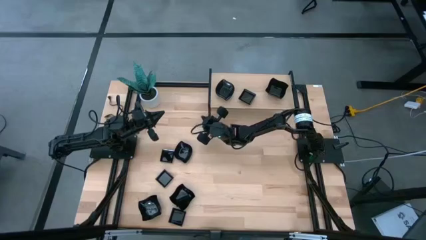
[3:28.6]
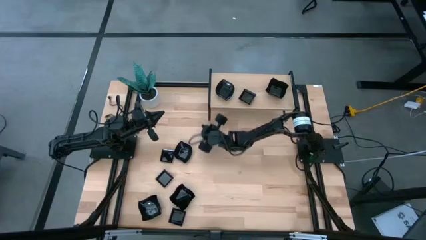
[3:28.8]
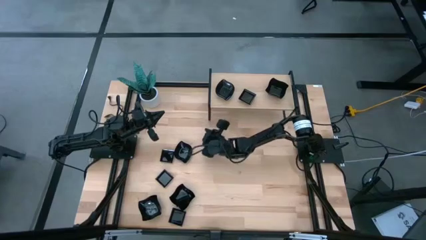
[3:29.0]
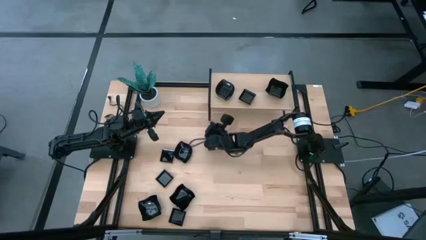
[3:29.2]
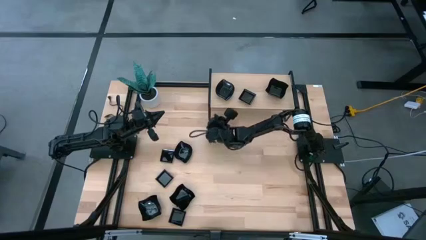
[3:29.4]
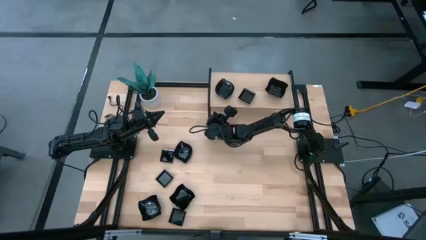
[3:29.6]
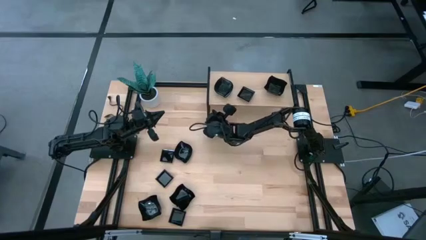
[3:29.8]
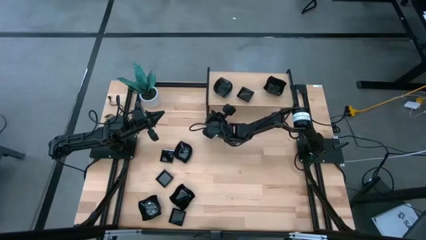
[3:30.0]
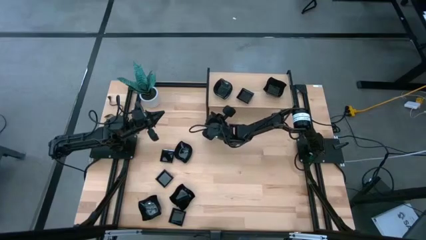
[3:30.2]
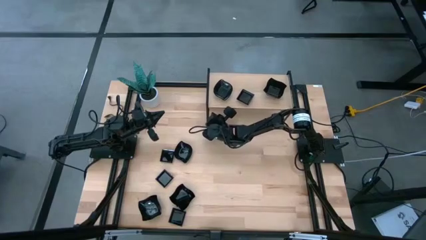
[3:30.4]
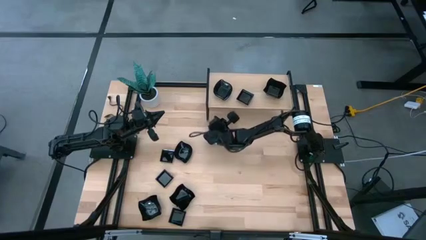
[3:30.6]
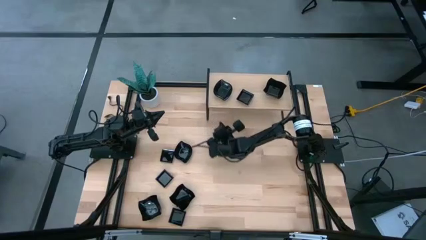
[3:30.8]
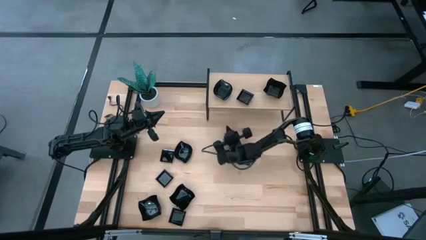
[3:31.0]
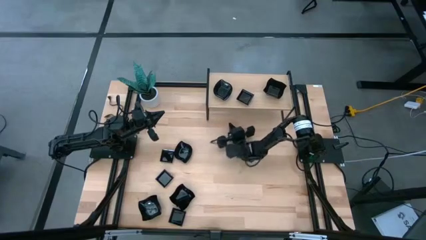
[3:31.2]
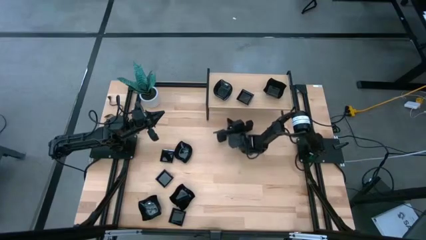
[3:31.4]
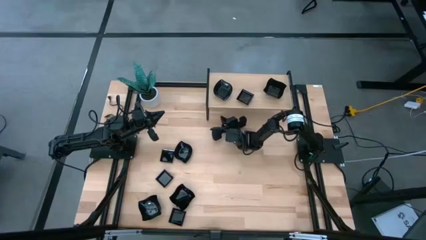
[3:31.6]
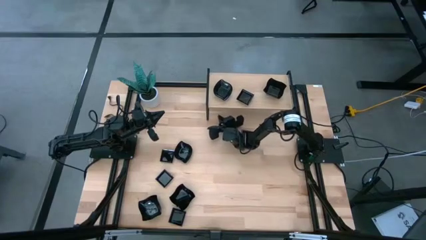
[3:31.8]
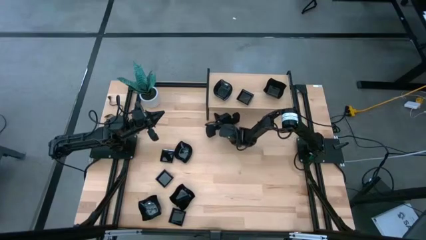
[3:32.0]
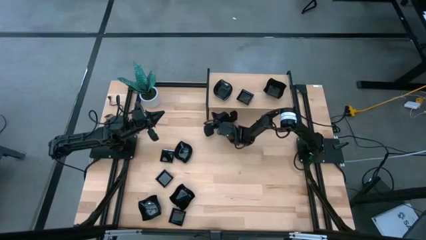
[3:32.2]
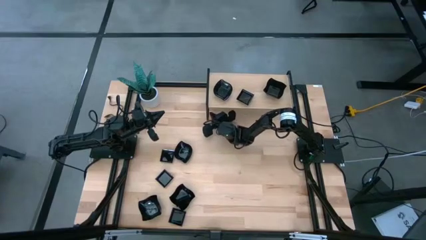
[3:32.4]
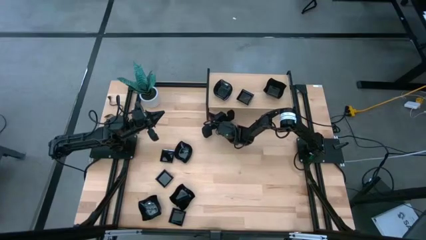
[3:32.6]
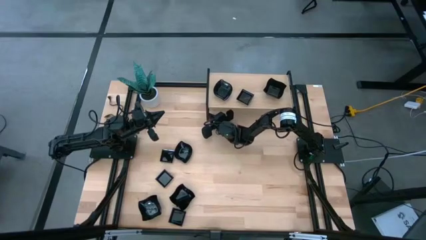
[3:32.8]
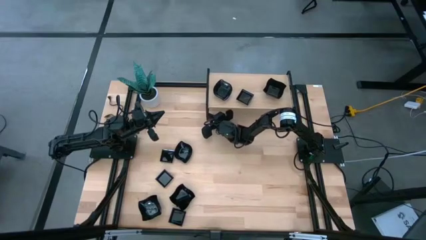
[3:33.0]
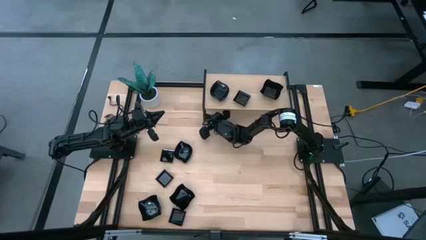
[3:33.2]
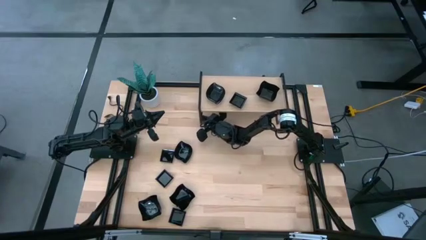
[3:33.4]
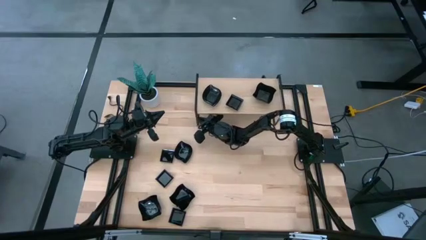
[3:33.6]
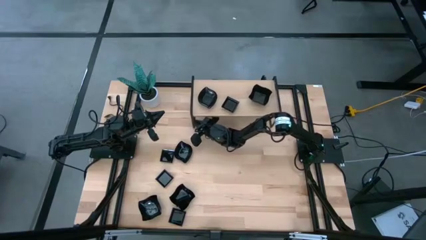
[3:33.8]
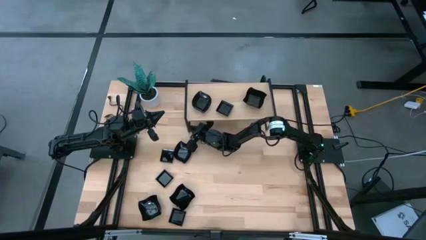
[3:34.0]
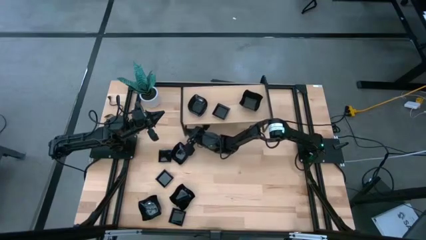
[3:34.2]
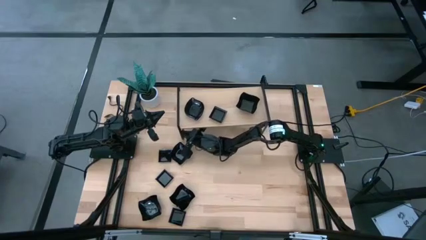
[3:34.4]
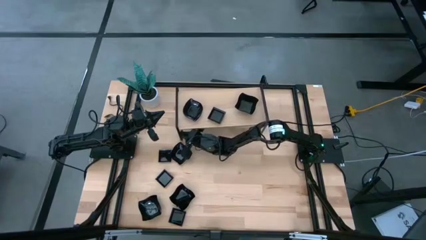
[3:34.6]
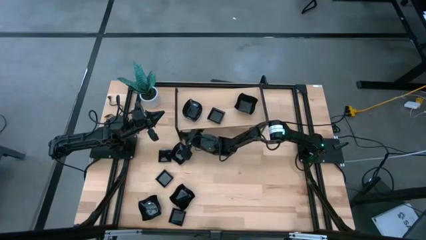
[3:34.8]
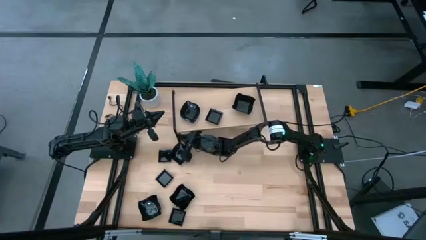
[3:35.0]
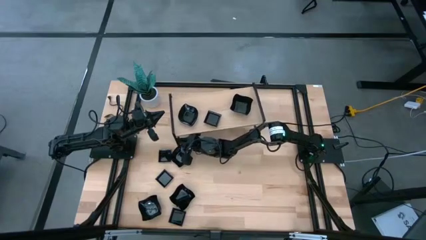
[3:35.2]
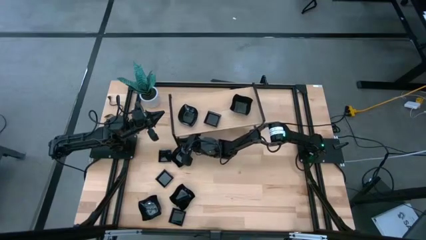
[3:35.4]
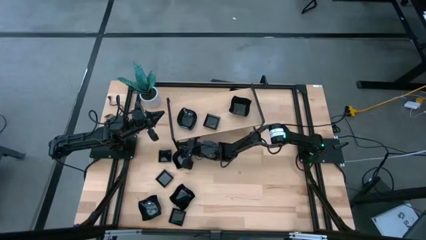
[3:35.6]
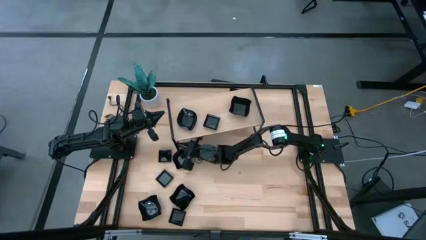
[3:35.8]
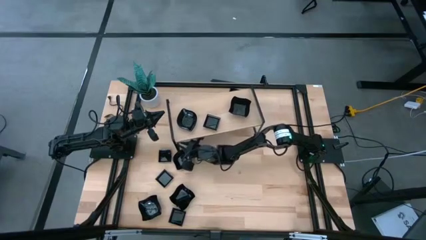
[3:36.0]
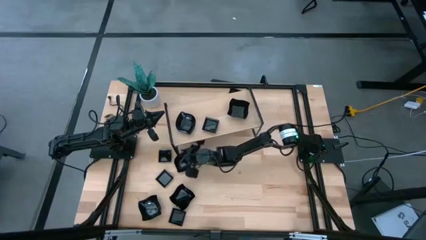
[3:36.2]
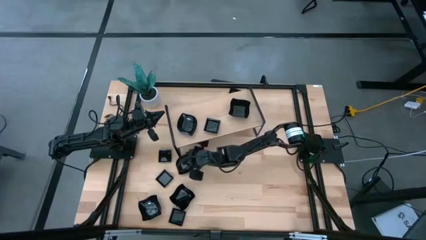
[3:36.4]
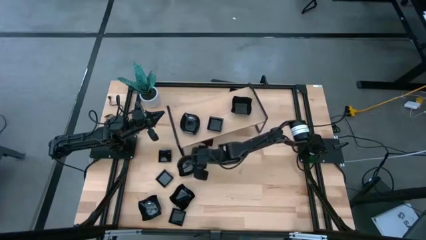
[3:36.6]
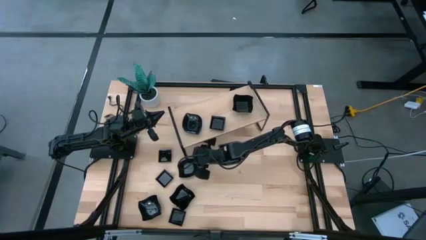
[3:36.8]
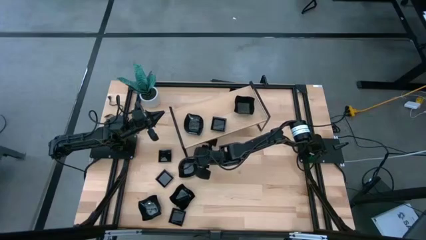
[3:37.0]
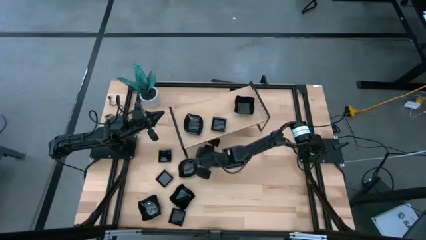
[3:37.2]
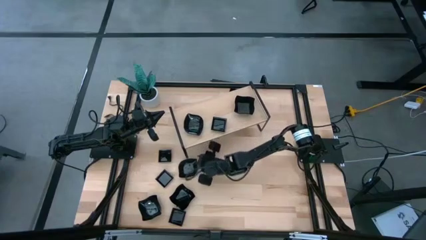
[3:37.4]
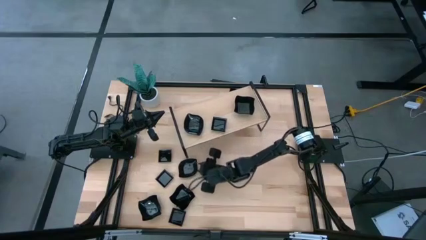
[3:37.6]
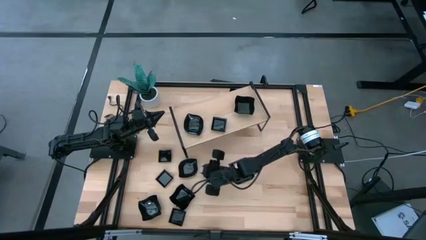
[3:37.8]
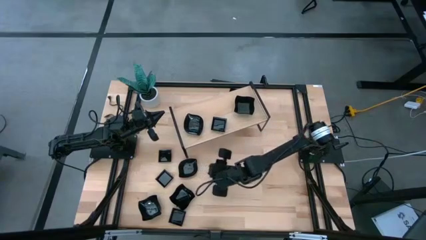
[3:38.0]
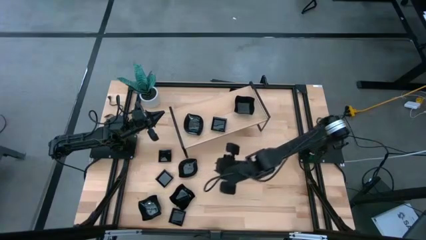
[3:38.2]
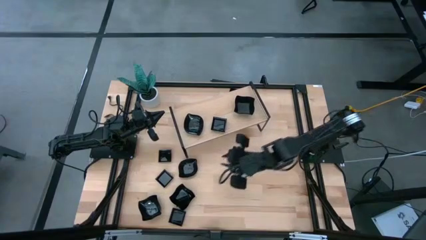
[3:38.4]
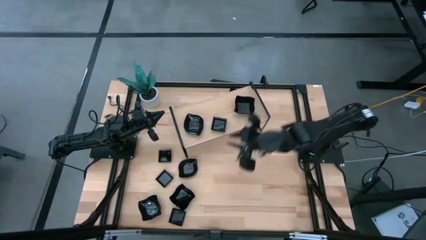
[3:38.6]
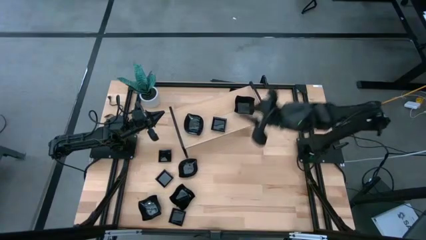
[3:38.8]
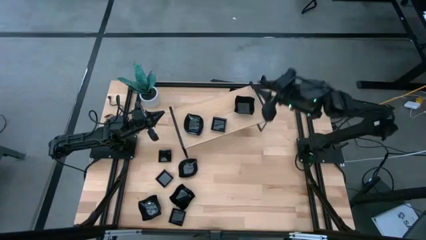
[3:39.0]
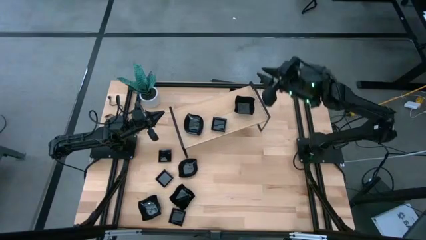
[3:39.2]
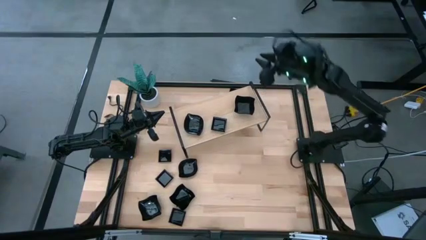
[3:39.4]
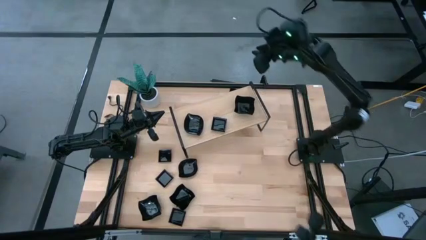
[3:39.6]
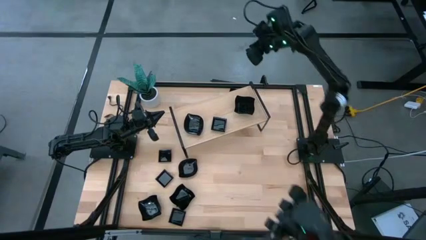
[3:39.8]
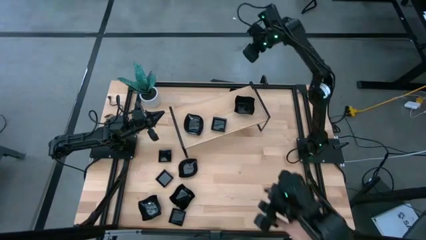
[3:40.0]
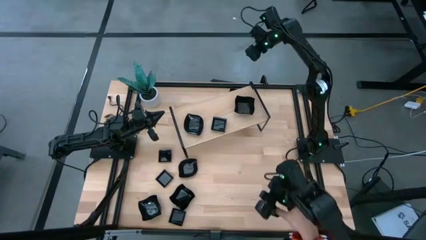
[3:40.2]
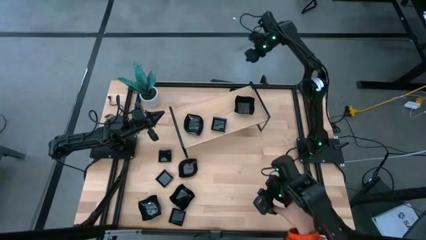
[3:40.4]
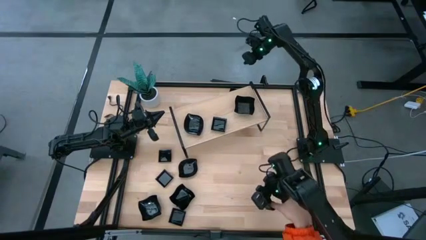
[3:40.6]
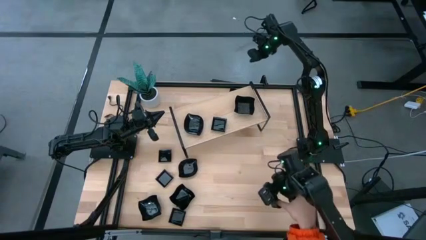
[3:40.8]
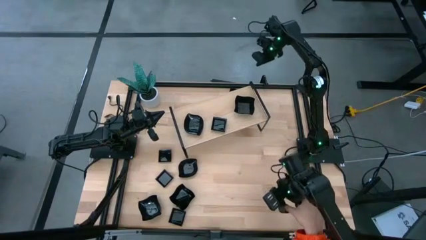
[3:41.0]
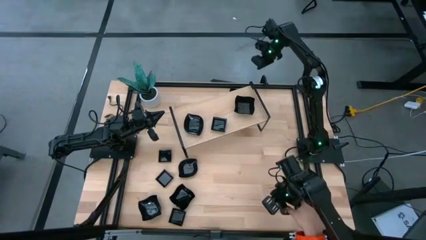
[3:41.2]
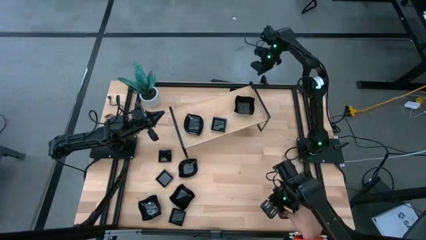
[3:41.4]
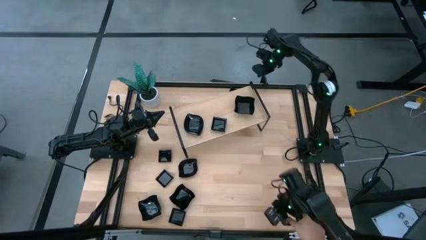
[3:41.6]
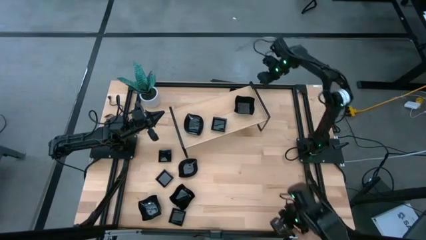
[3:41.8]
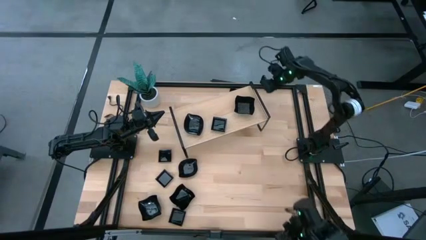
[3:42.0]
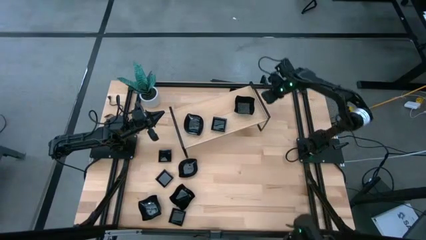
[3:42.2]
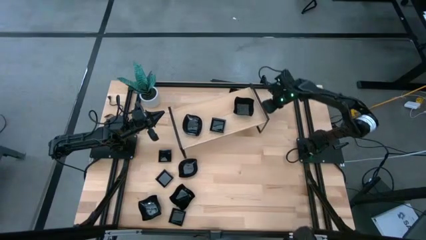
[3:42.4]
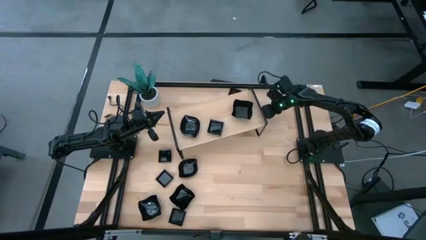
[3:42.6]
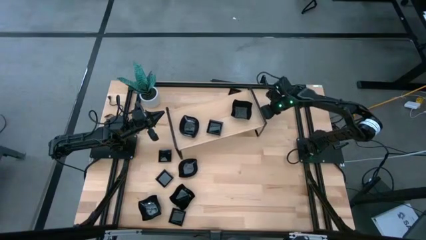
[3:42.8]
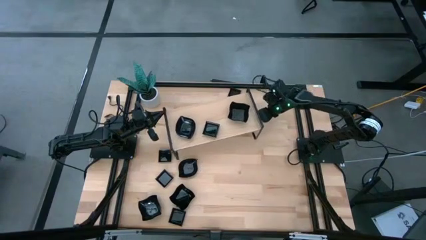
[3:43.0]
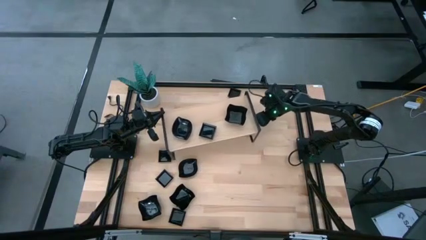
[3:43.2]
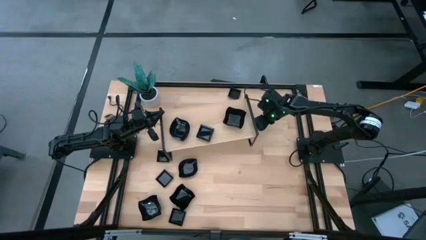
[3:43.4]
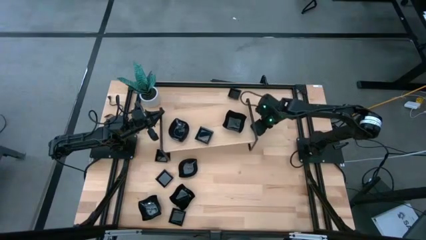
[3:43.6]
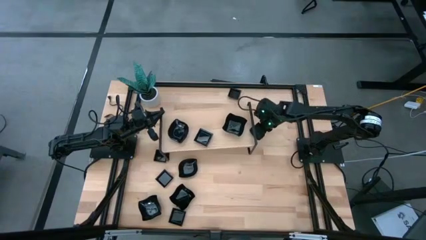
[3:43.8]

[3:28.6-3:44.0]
Task: Pick & Place Mini shaped plates
Move the shelf to the center of the table
